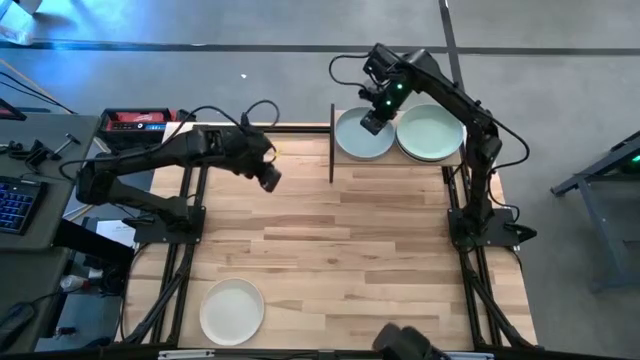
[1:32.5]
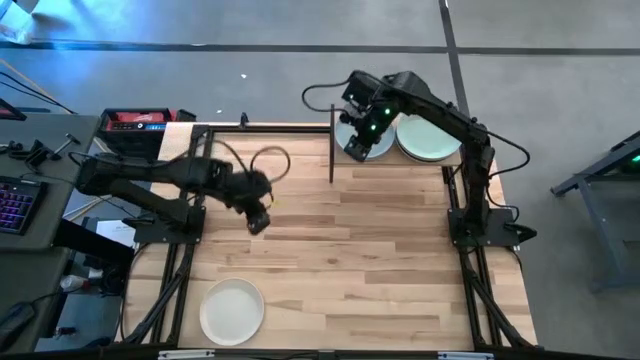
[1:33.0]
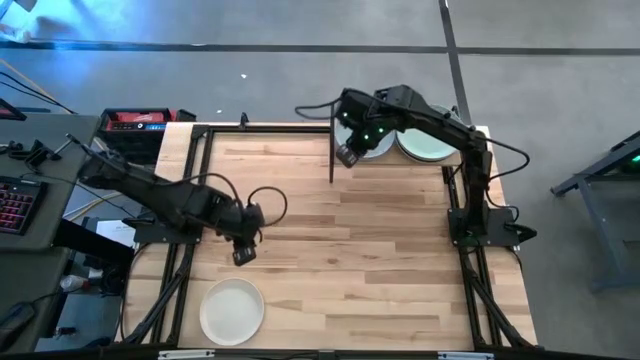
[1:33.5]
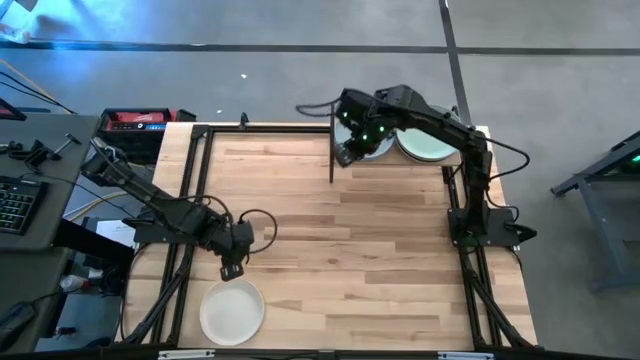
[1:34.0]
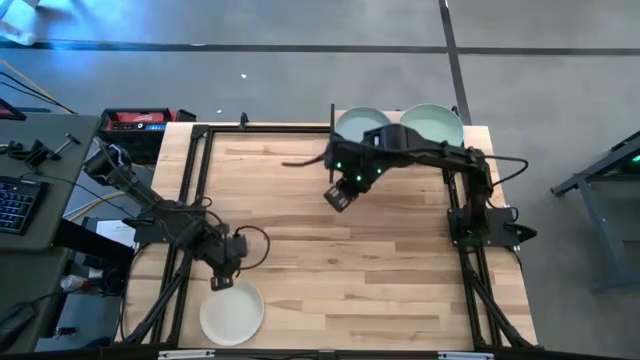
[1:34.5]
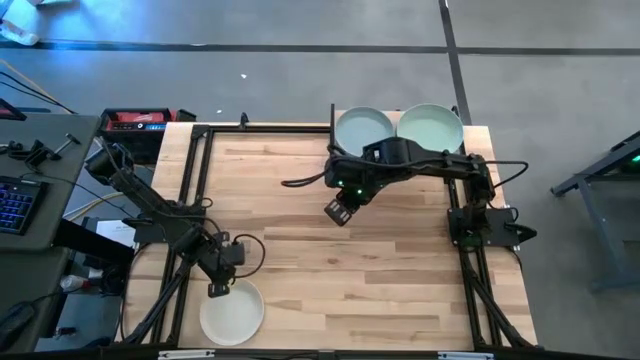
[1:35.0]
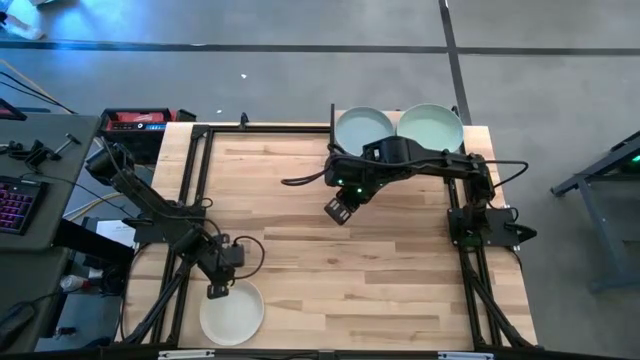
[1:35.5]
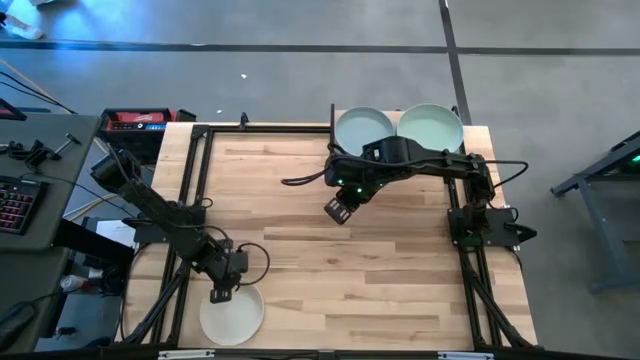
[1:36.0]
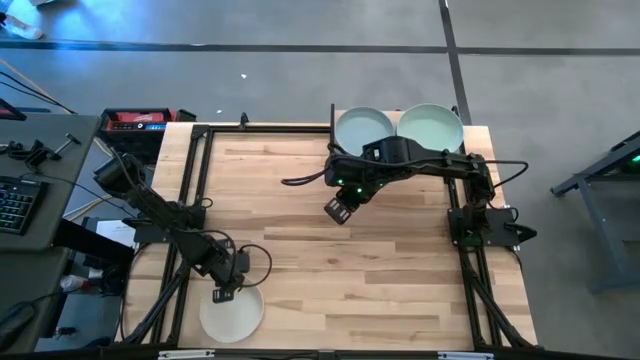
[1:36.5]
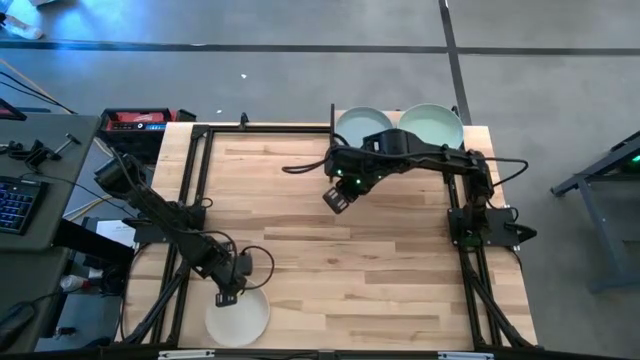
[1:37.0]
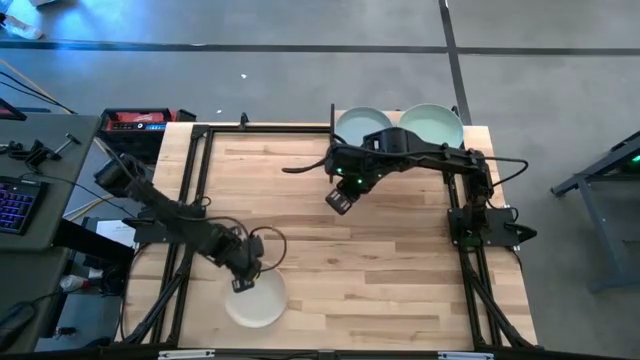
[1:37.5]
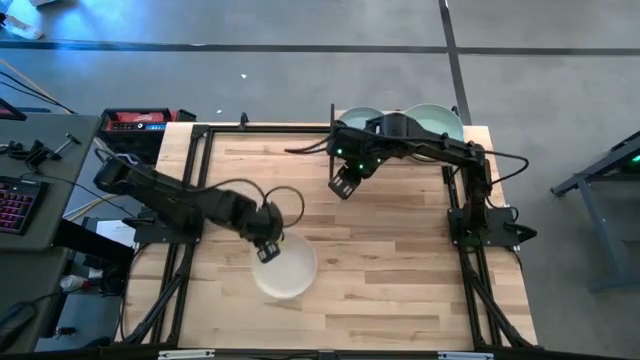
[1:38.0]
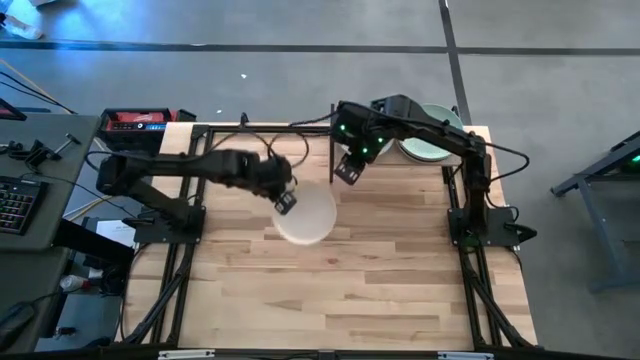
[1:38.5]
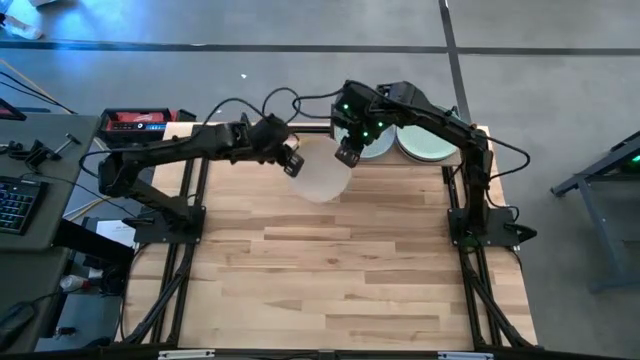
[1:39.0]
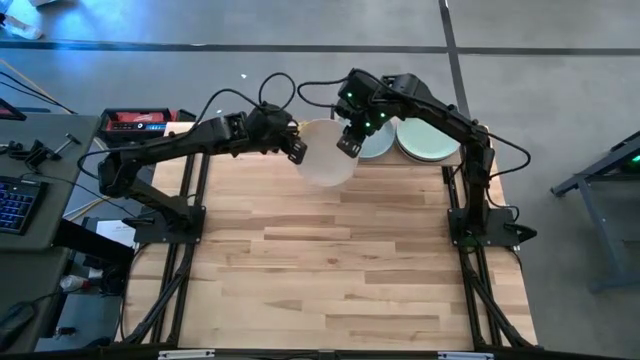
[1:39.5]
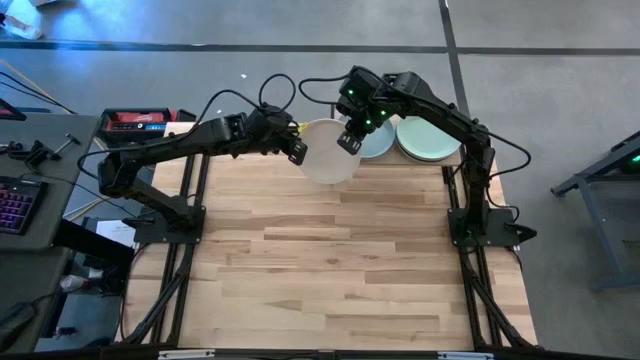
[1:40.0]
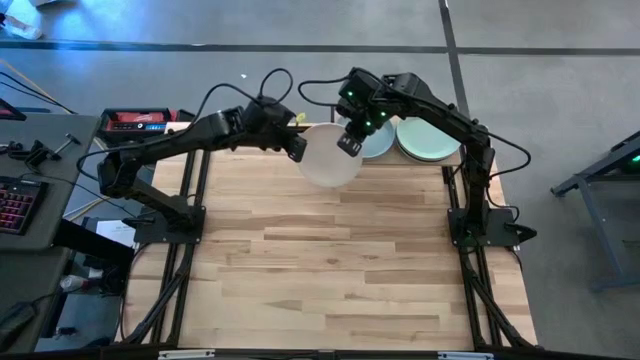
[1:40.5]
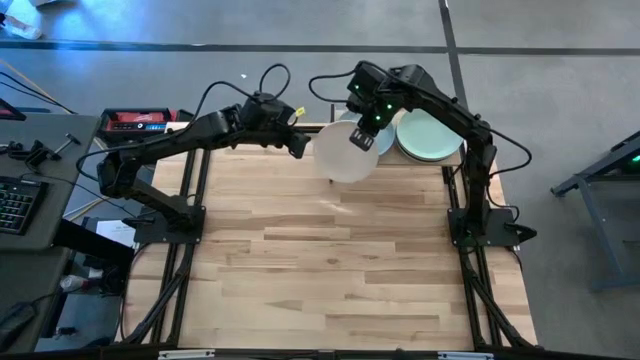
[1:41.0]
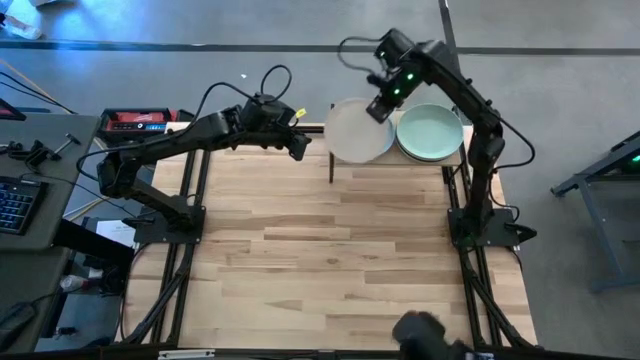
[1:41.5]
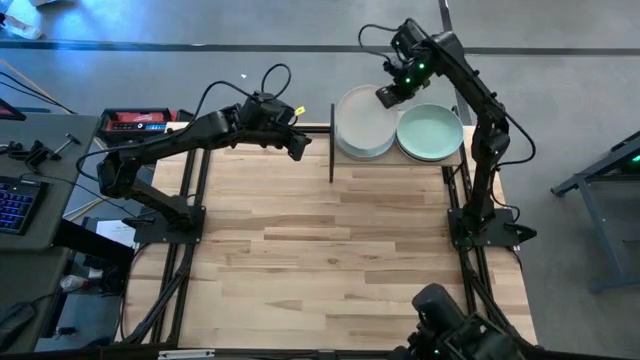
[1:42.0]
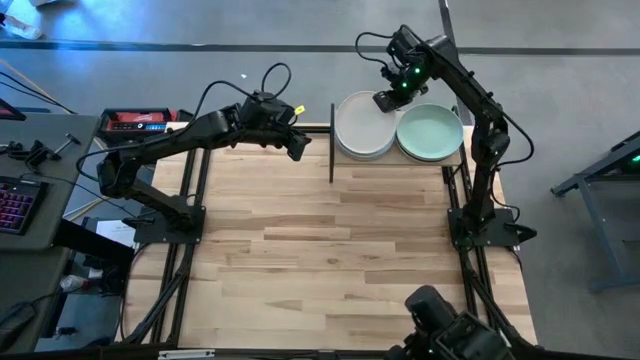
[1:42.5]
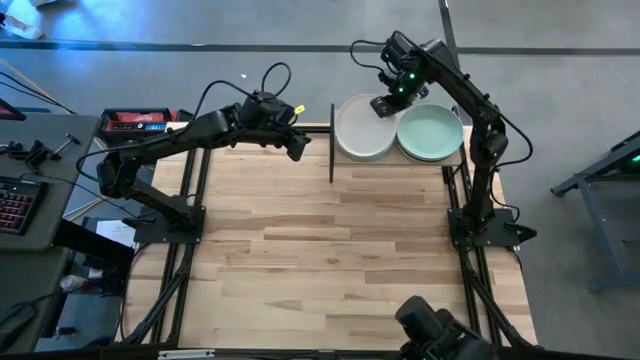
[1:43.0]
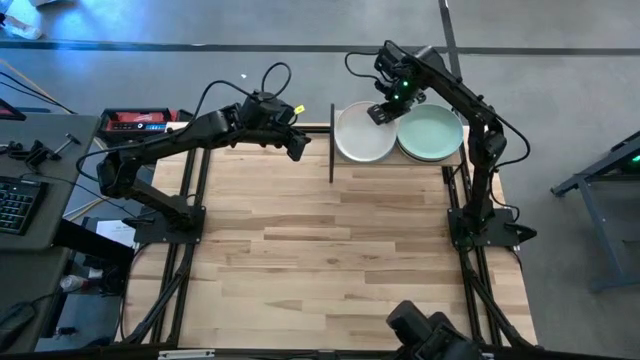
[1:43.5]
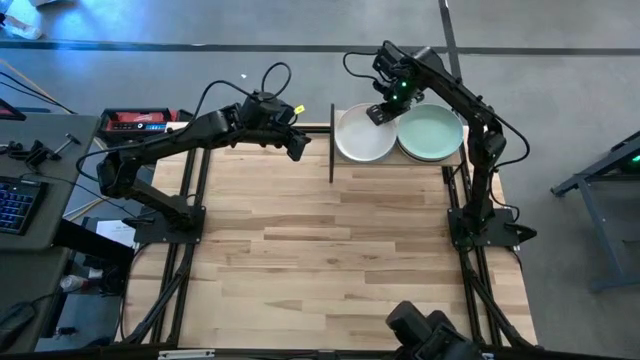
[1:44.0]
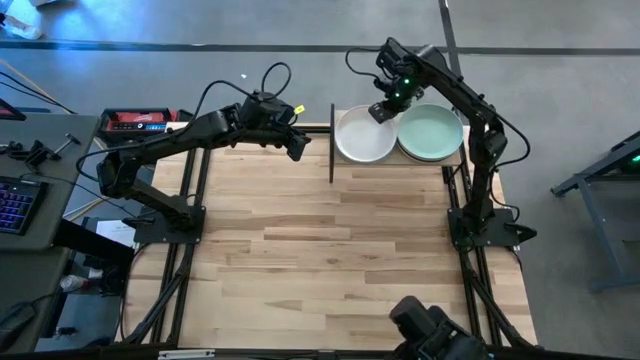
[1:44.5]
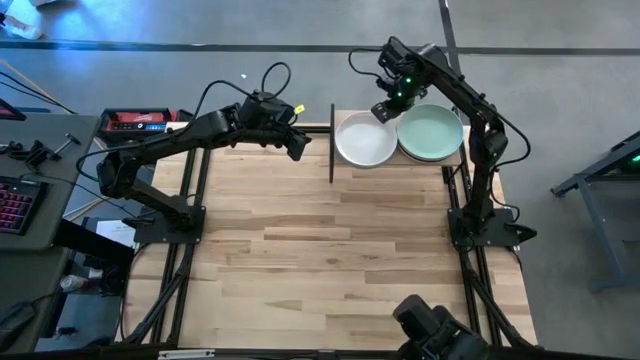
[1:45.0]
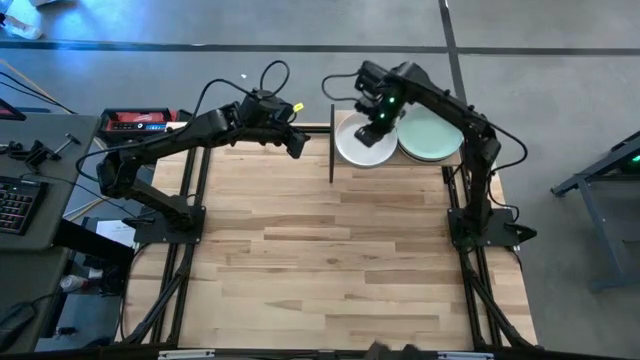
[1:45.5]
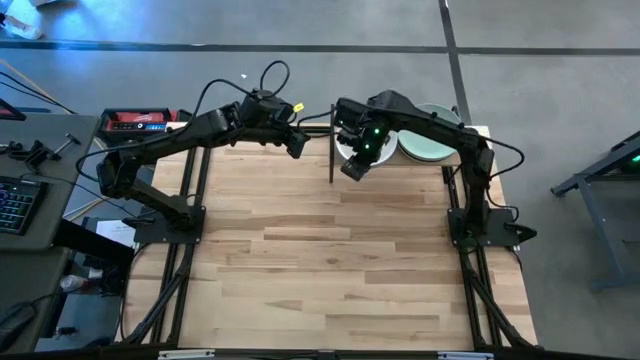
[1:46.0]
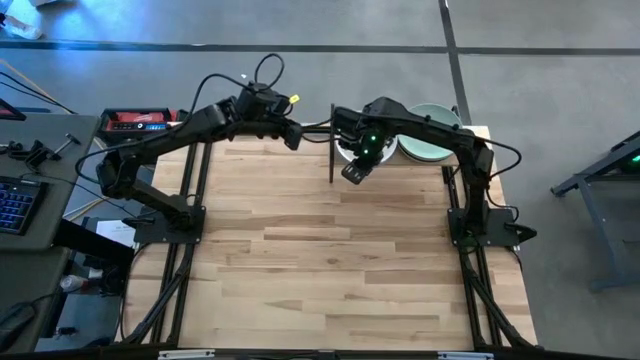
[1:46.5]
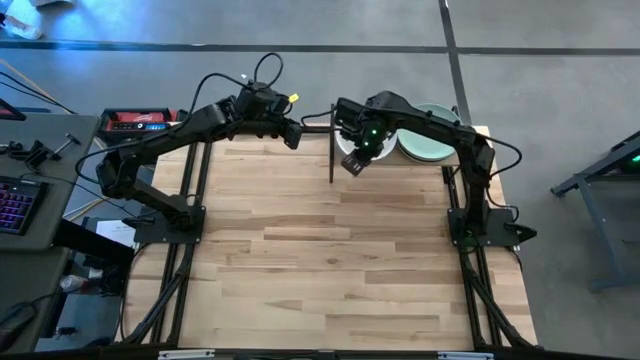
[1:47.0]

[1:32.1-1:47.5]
Task: Place and stack plates onto a shelf
Stack the white plate on the top of the blue plate on the shelf

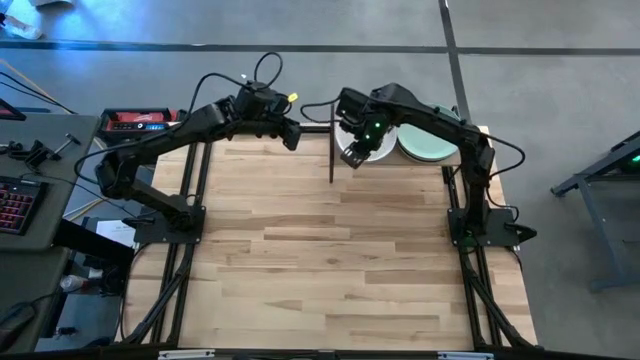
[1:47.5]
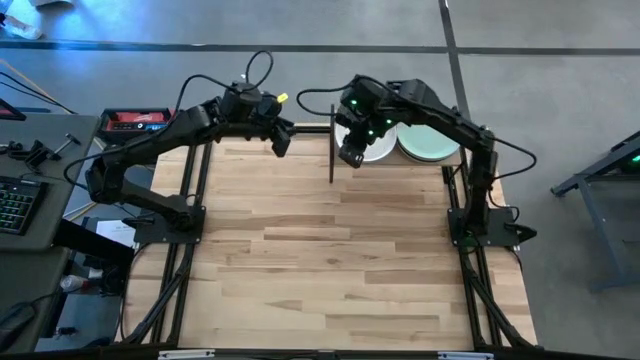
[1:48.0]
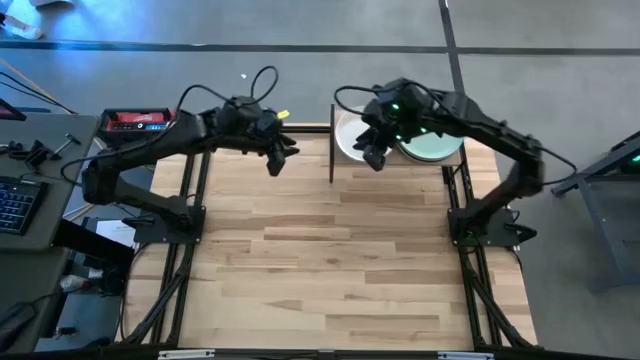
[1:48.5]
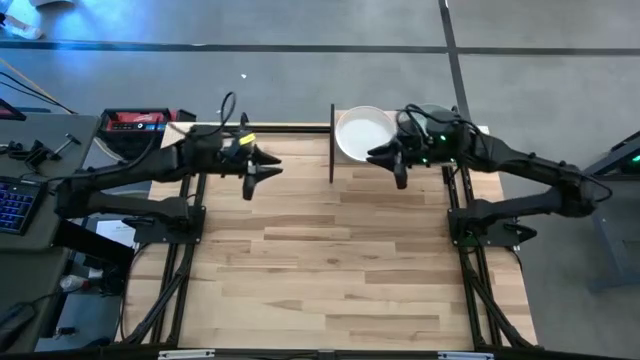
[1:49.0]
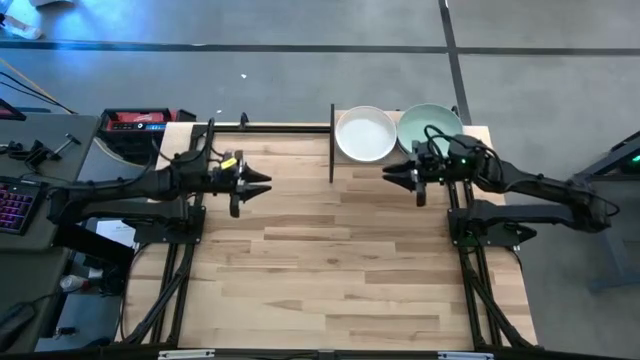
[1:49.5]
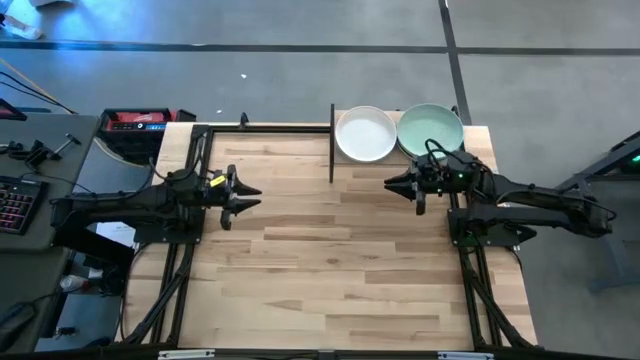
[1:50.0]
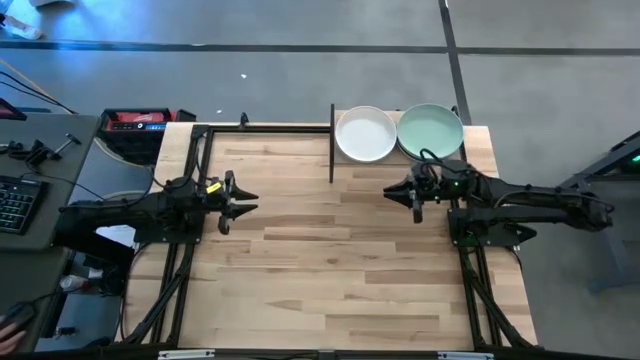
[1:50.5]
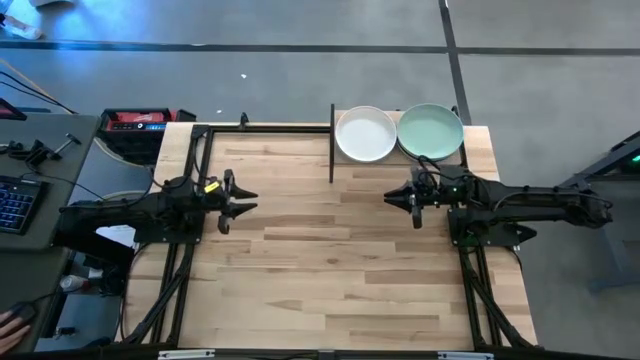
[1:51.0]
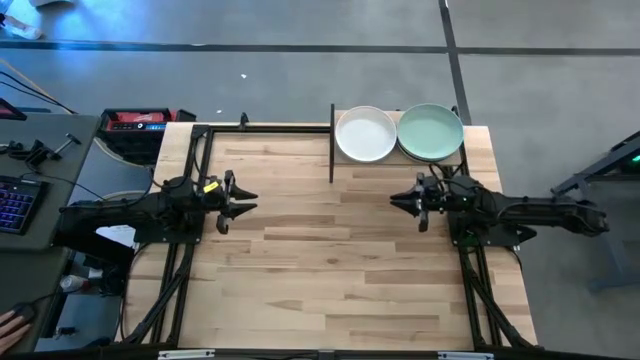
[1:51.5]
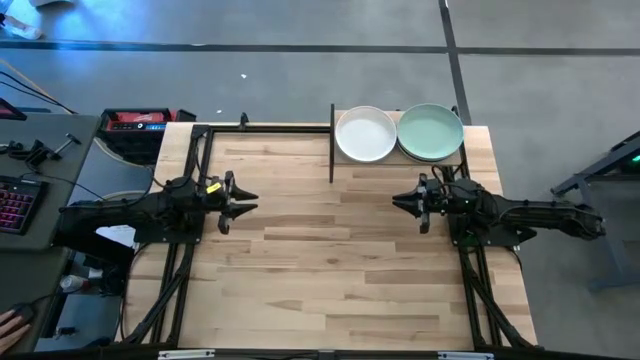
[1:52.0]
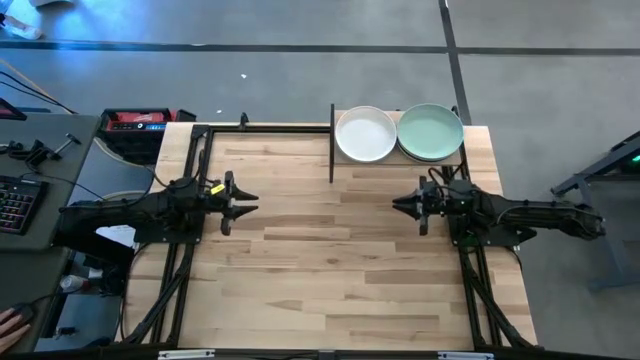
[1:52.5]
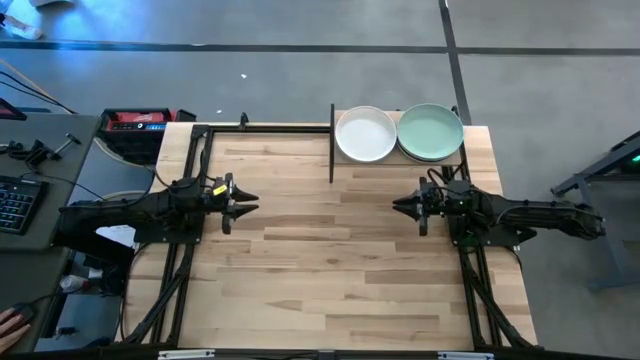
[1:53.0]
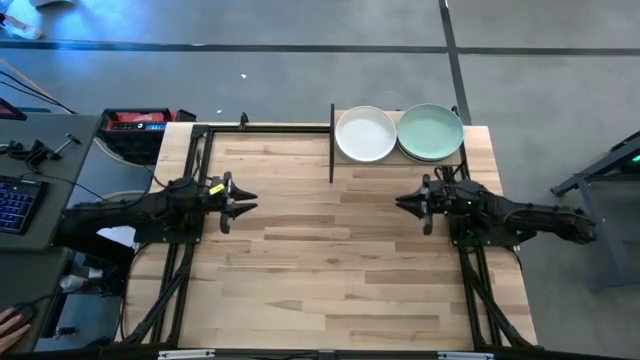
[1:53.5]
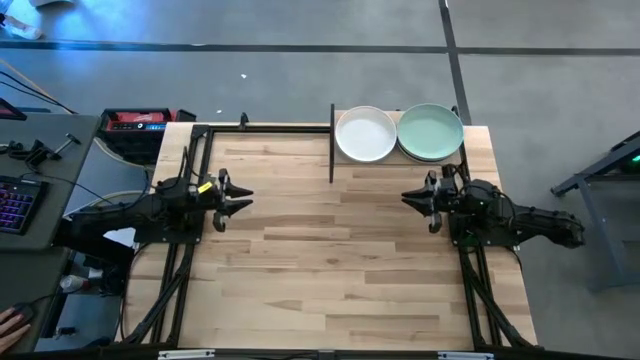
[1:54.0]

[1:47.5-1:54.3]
Return to Home Position
